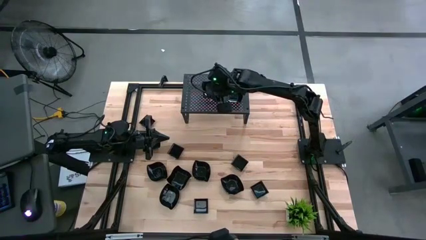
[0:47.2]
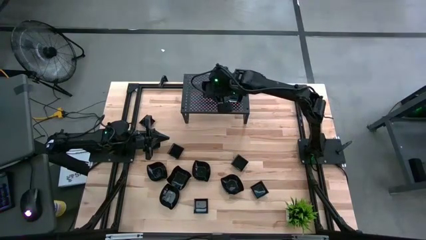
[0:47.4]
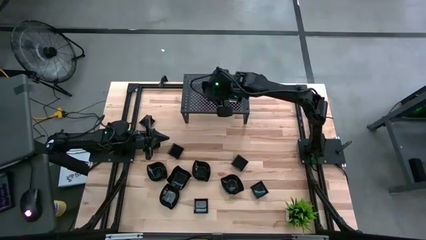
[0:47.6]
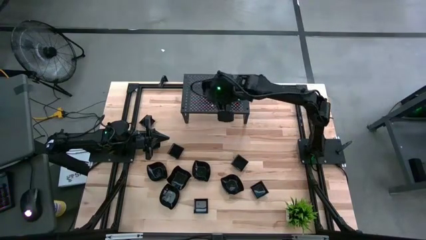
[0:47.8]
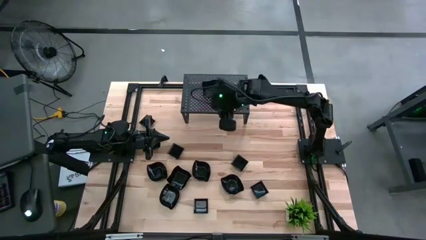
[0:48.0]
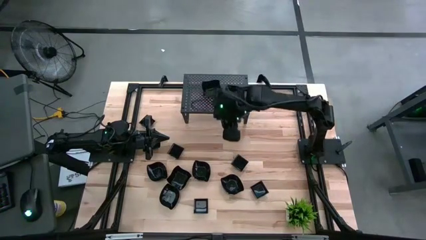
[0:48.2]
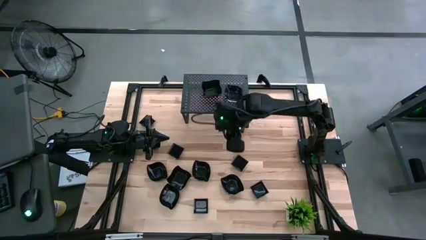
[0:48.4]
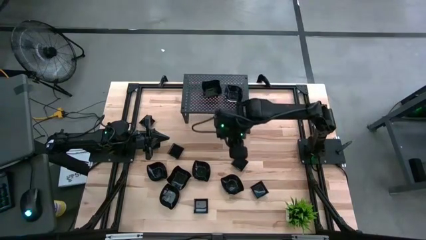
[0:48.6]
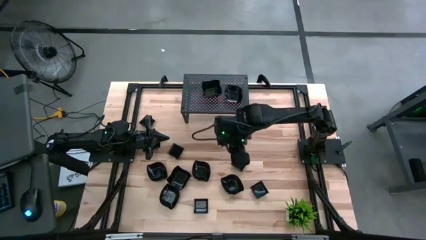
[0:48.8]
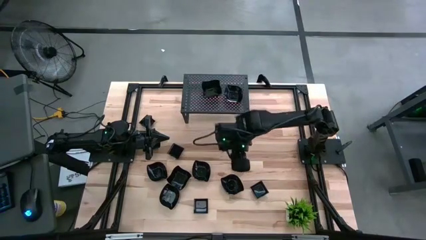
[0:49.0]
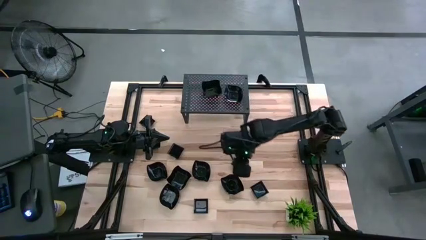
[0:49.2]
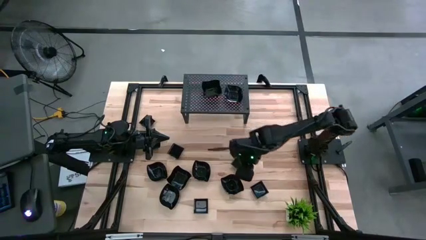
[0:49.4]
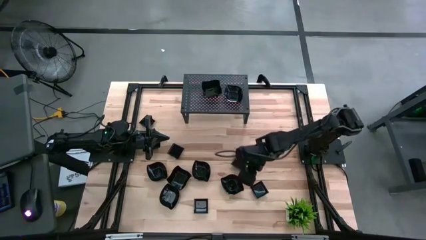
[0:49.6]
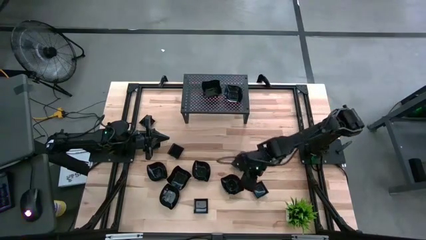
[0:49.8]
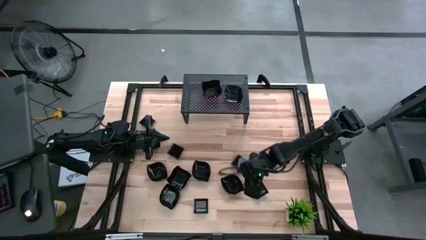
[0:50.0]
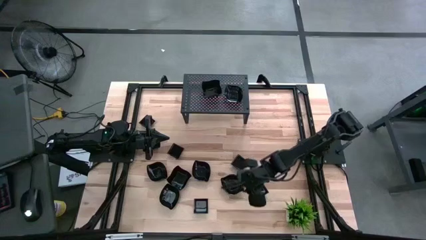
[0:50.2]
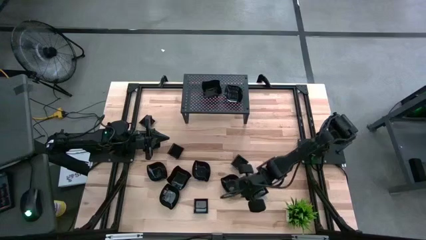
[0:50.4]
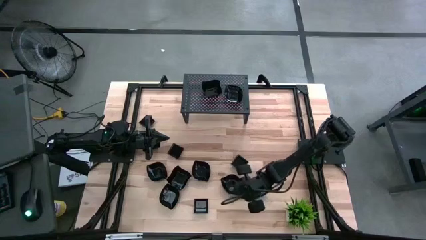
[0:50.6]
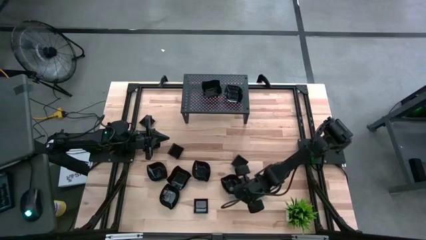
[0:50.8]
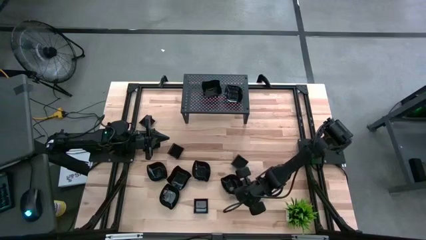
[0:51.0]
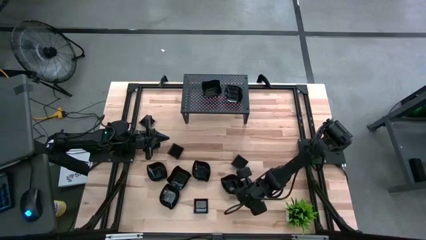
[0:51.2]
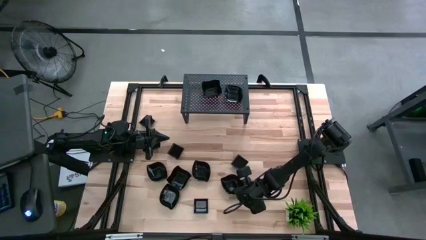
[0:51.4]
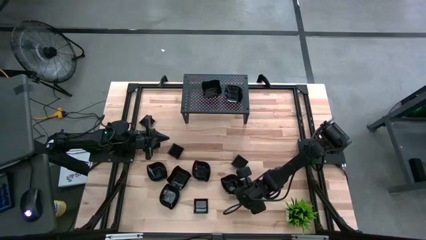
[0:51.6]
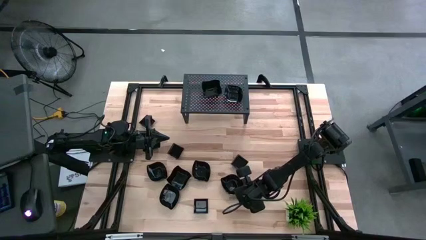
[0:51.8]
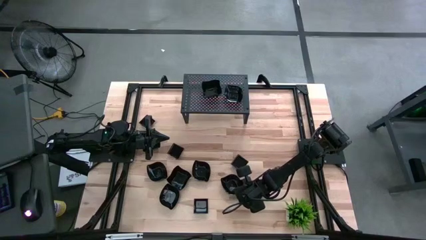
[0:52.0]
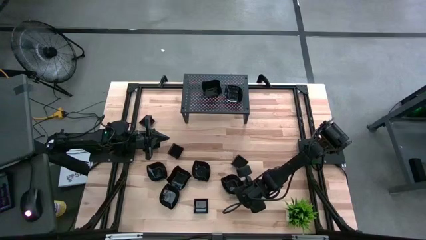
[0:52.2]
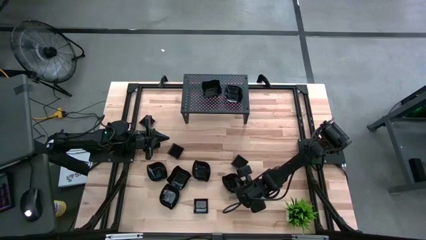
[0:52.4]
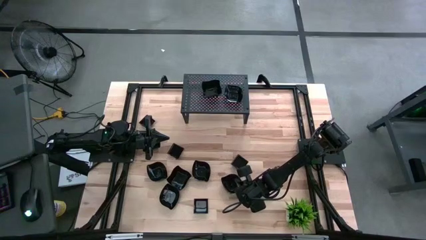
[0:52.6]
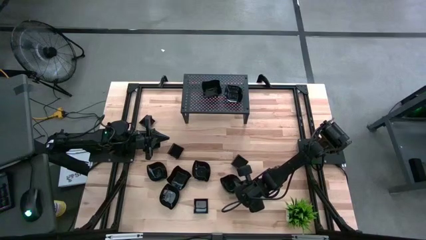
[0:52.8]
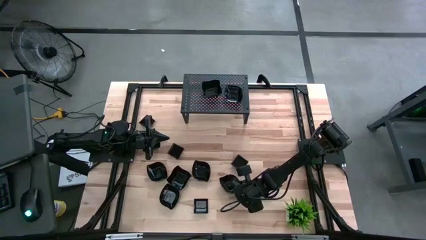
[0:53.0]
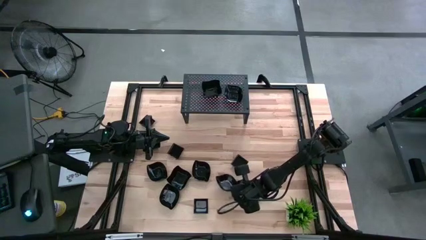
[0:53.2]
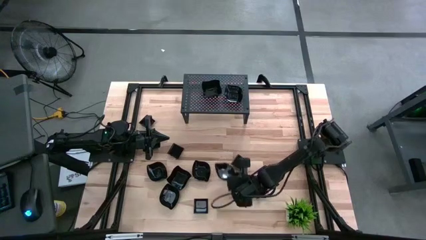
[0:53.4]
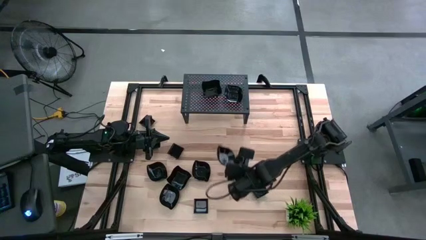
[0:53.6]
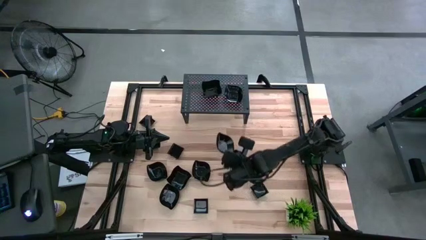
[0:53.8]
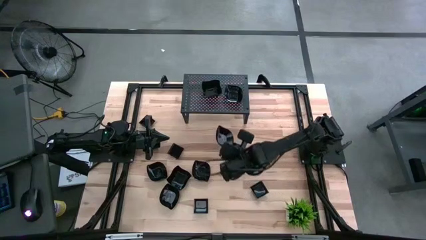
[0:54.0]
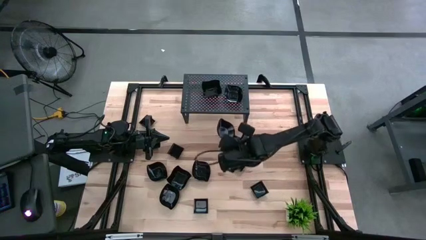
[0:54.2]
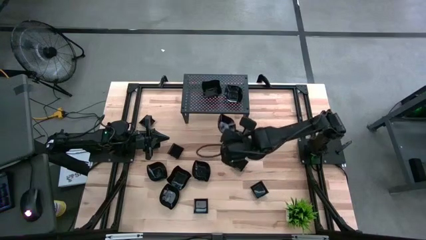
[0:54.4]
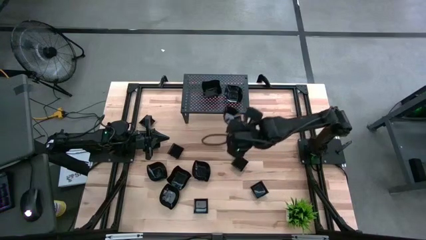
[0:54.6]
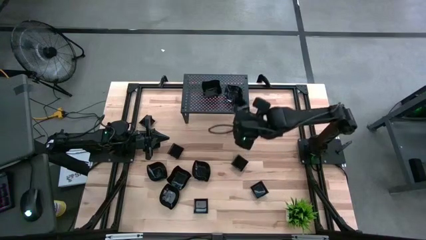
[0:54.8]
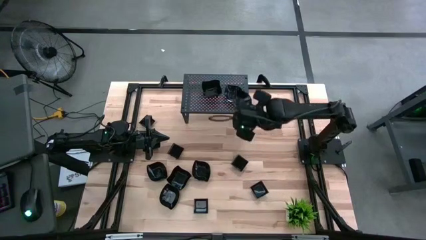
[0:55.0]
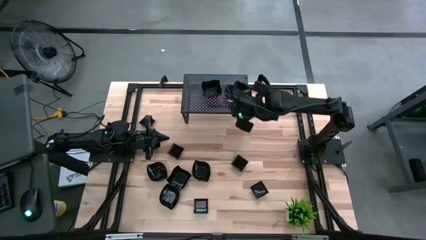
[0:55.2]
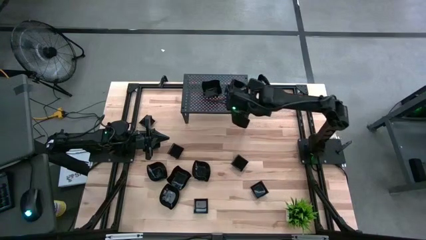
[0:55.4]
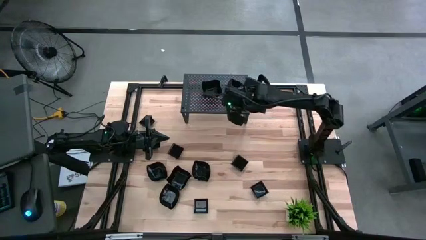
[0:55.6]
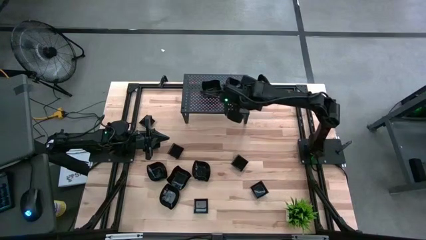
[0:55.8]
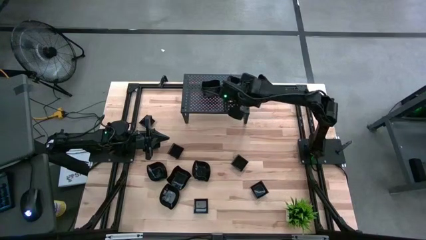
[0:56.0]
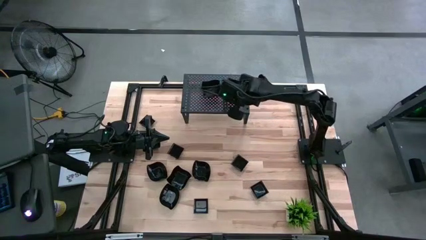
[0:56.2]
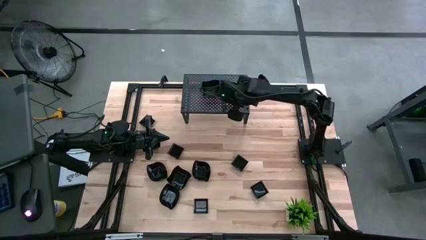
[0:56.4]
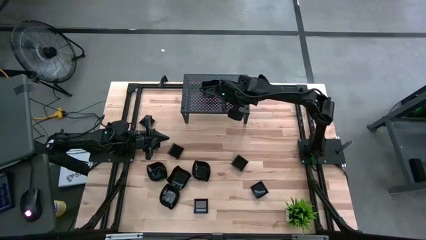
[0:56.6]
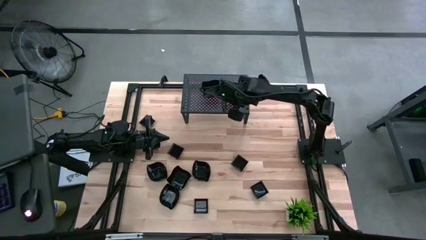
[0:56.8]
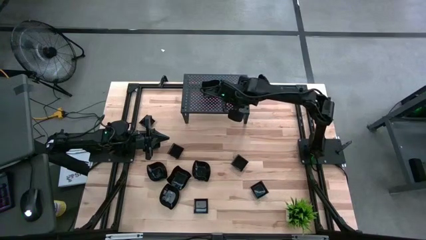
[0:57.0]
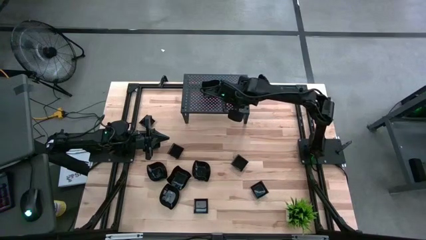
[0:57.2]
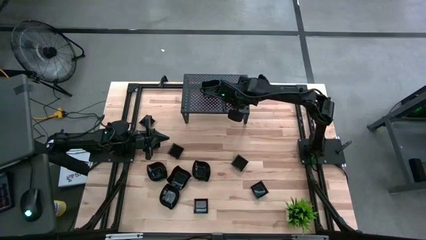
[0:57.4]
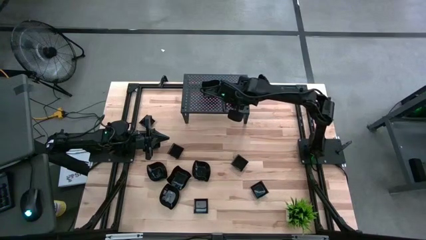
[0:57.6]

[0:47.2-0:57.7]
Task: Pick & Place Mini shaped plates
Stack the leaf-shaped plate on top of the leaf-shaped plate on the shelf
